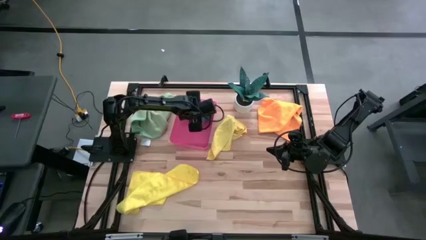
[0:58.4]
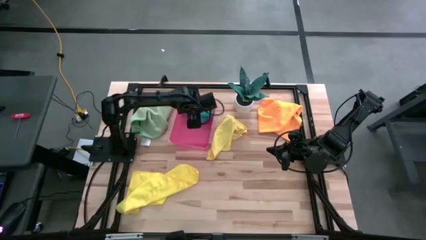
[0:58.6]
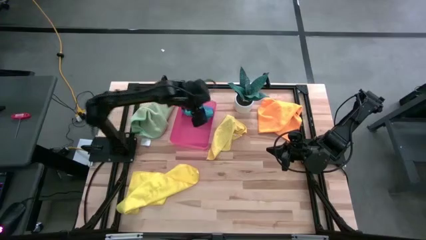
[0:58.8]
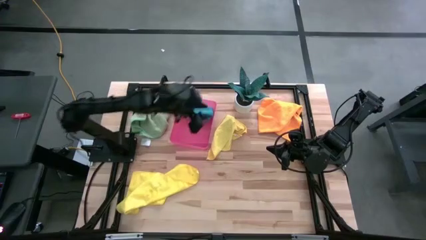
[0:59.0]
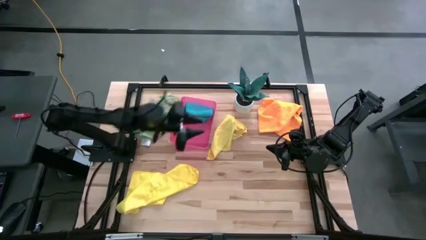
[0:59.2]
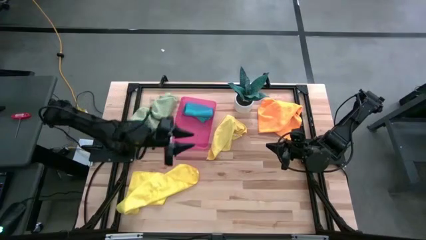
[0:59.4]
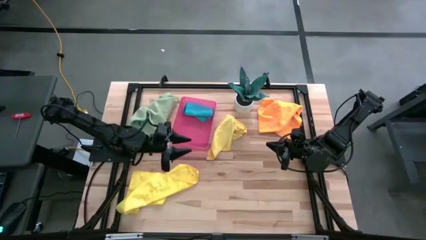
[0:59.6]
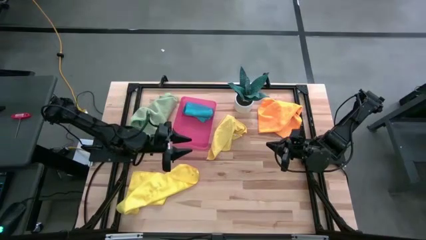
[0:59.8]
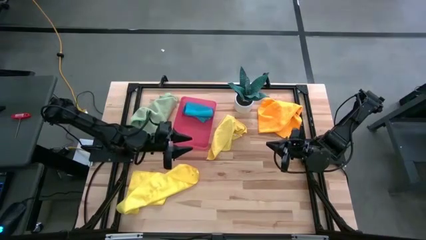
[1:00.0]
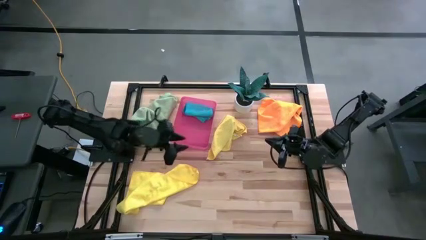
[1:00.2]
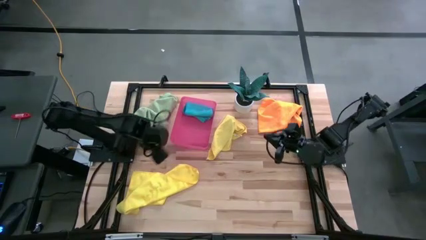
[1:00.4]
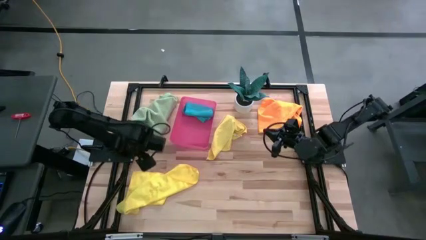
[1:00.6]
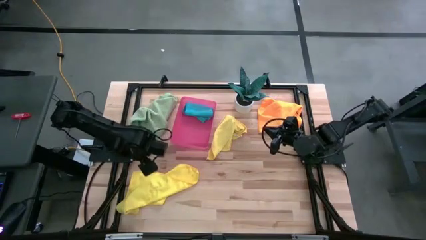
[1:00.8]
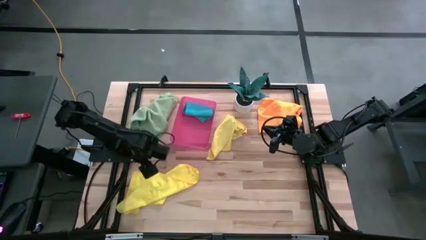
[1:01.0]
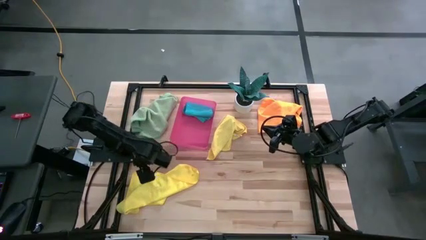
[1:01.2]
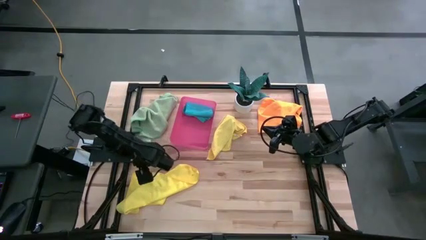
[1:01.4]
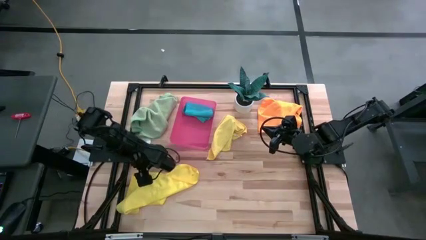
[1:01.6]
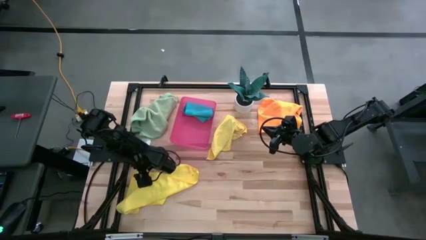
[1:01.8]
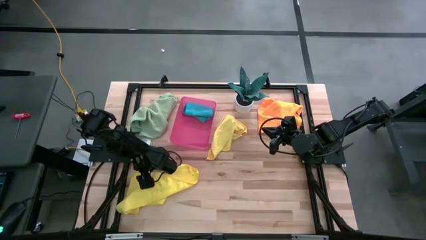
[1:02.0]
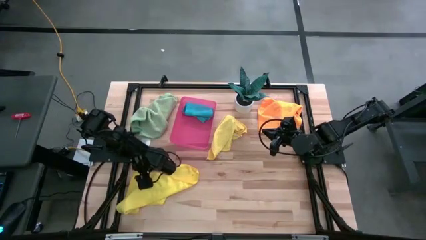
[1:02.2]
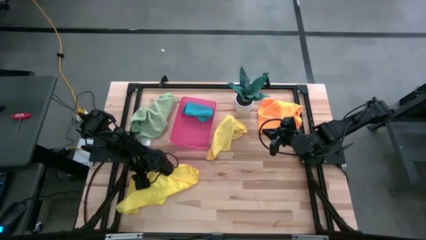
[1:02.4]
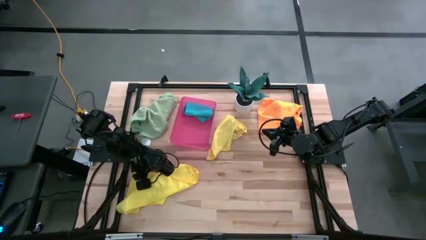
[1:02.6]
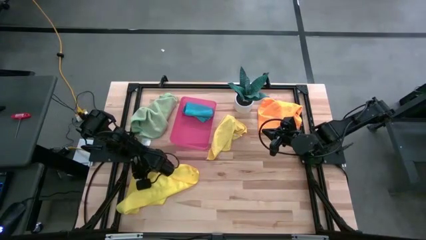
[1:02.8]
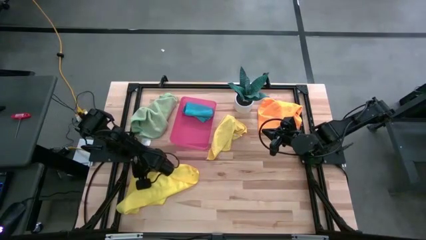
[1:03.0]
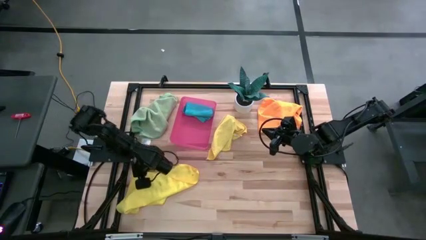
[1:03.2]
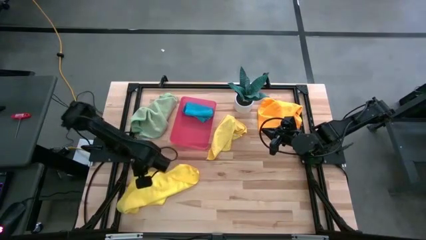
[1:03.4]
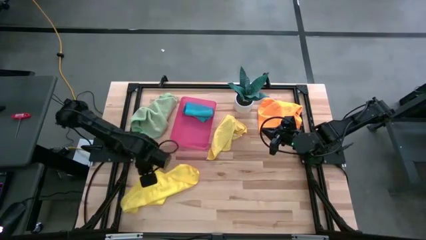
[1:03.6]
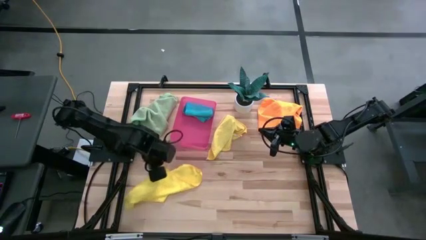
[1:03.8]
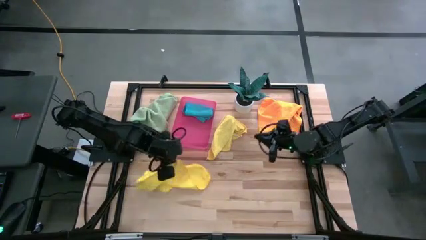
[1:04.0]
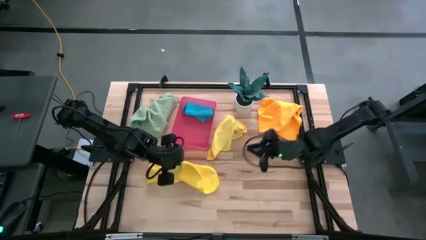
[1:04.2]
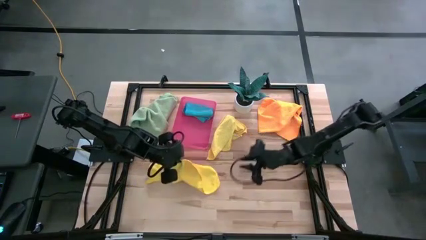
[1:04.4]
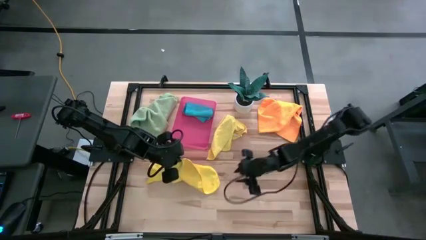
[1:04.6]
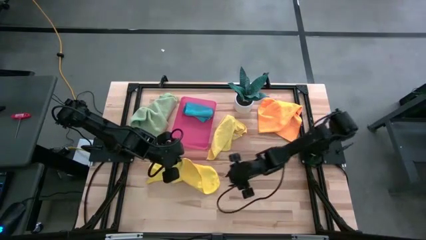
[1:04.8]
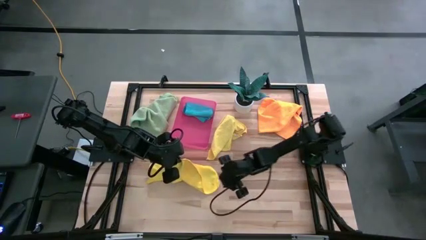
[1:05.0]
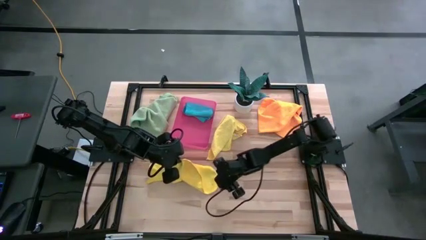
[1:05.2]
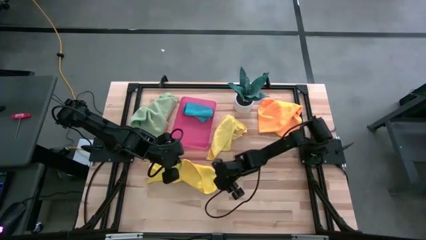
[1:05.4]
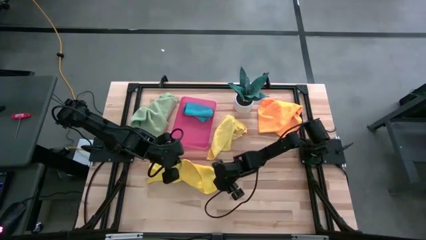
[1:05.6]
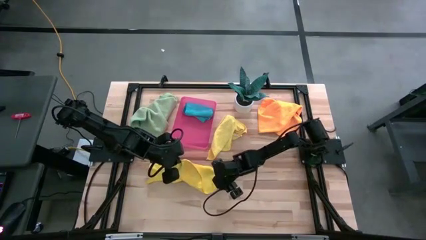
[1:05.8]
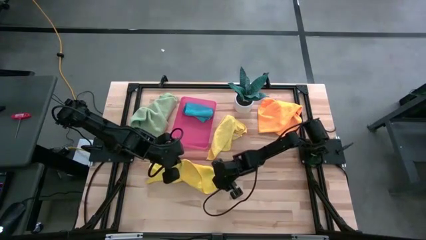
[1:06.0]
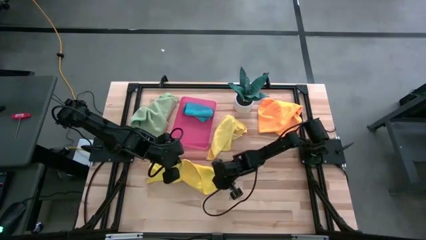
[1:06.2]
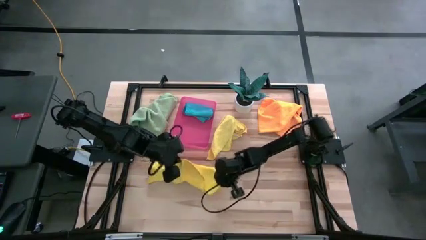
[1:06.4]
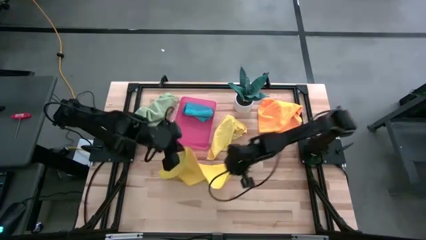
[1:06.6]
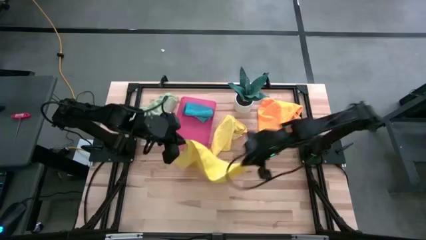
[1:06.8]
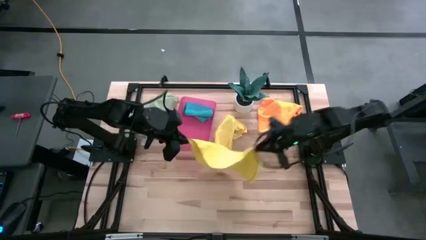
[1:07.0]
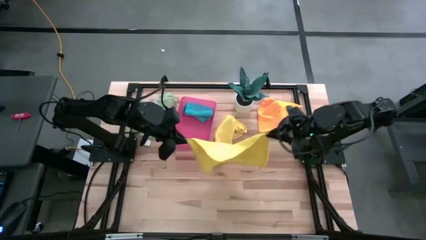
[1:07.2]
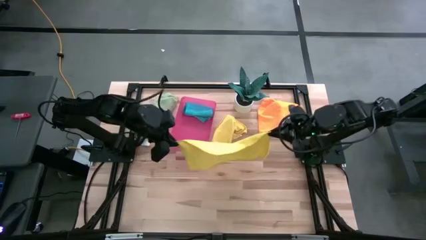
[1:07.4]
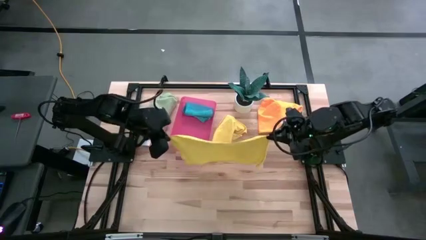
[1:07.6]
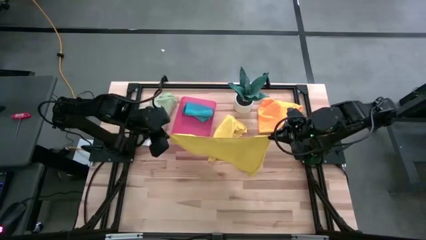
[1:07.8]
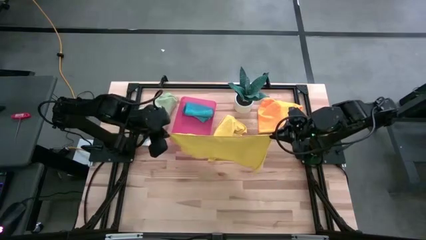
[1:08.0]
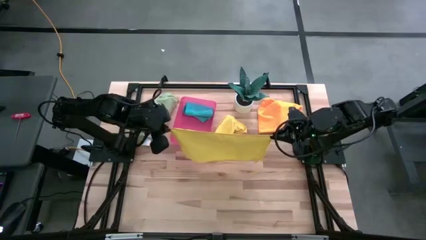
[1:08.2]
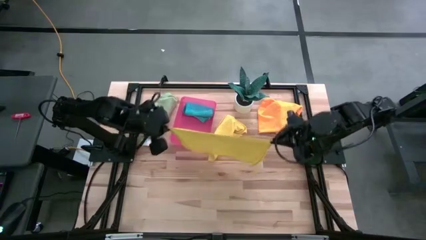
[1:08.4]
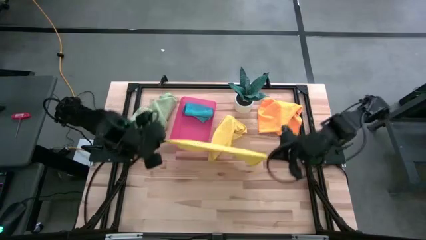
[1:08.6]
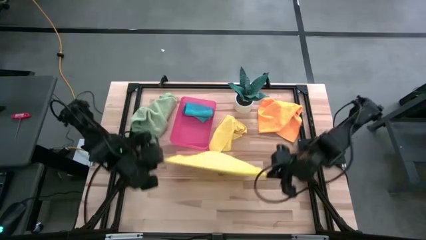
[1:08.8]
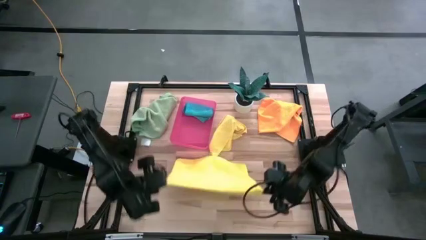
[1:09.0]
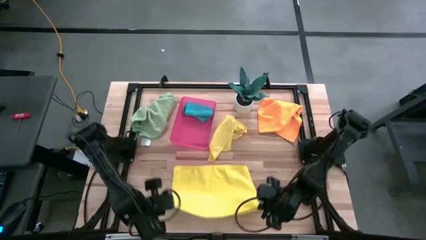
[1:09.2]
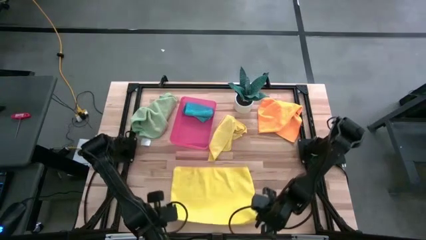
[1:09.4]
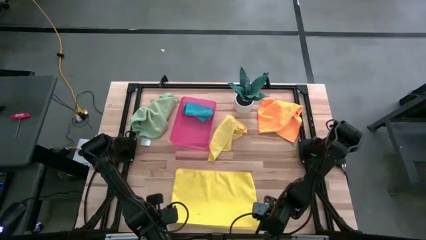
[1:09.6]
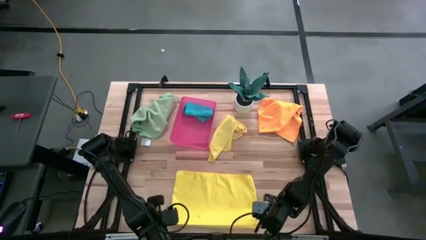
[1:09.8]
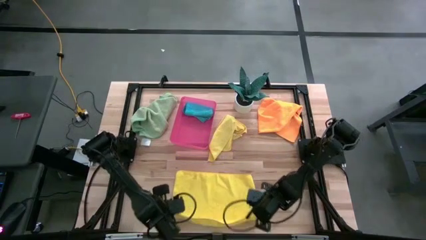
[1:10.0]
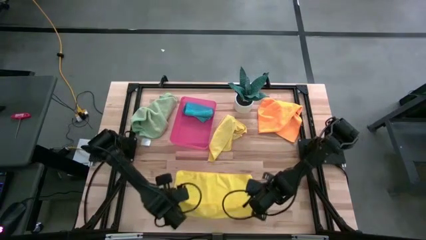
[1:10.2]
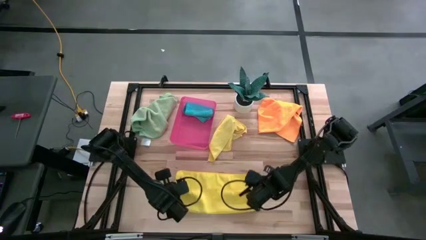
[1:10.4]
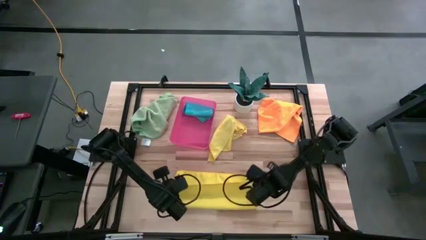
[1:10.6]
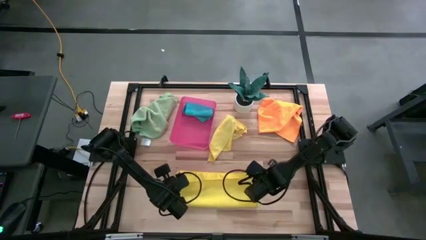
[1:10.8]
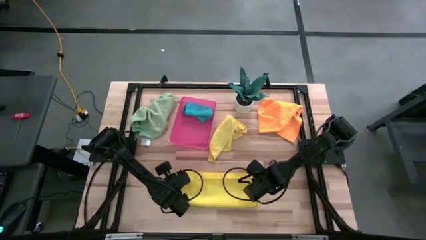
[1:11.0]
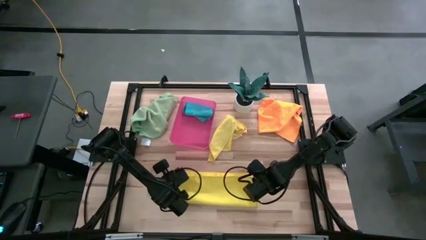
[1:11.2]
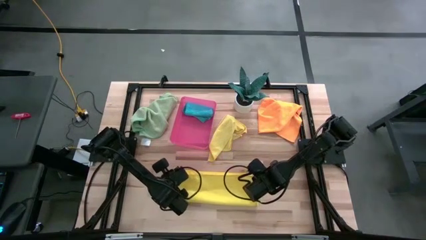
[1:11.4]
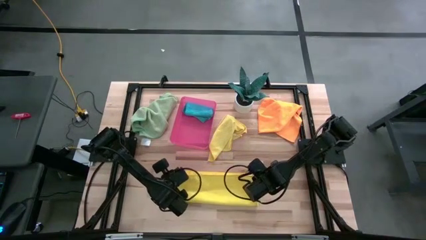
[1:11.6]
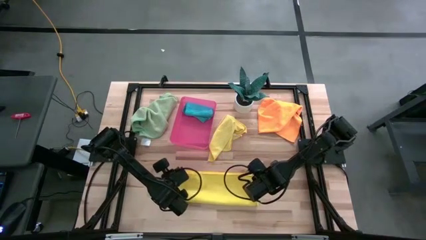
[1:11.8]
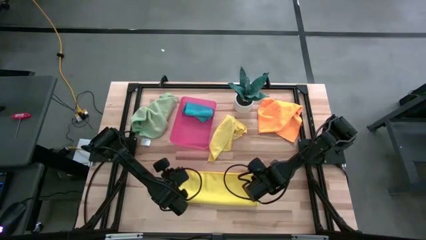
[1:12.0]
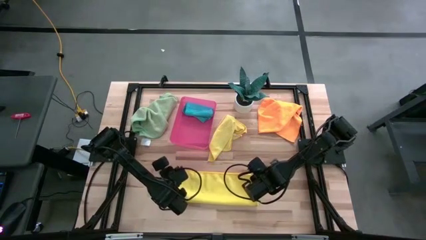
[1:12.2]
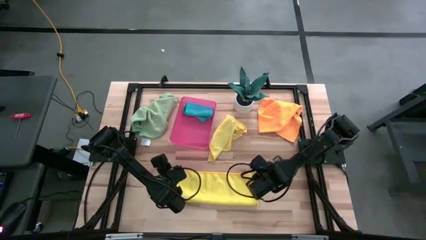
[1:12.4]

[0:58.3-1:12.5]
Task: Fold microfiber towels
Fold the bottom yellow microfiber cloth

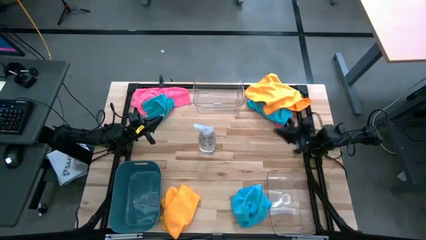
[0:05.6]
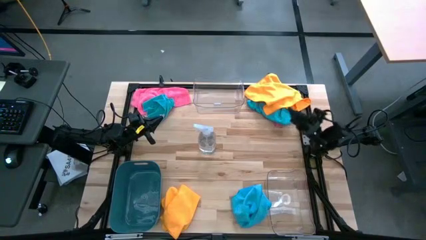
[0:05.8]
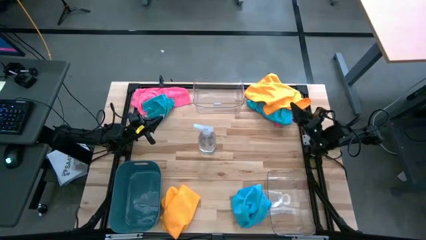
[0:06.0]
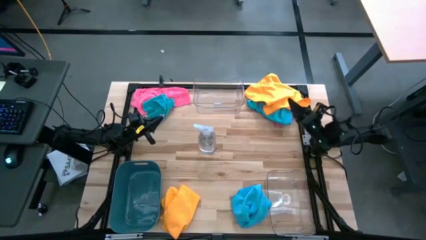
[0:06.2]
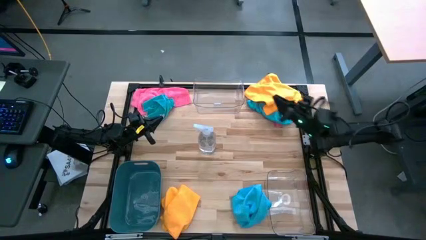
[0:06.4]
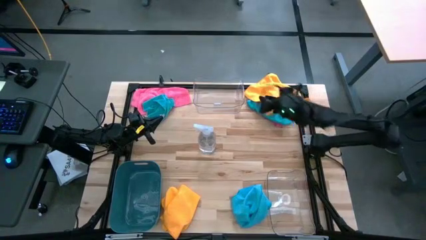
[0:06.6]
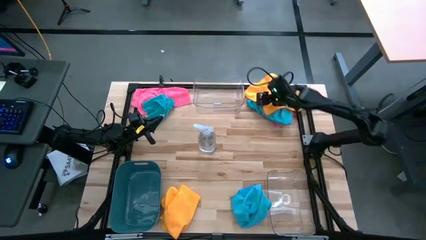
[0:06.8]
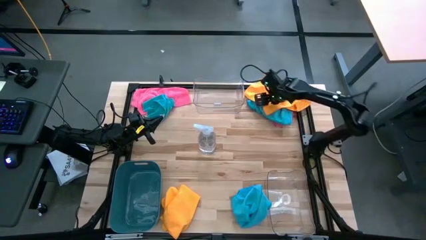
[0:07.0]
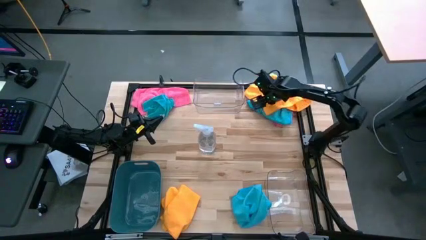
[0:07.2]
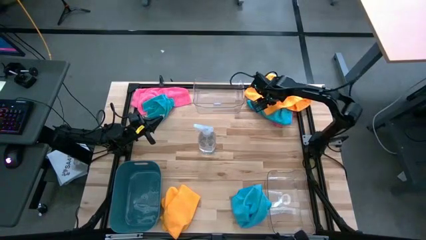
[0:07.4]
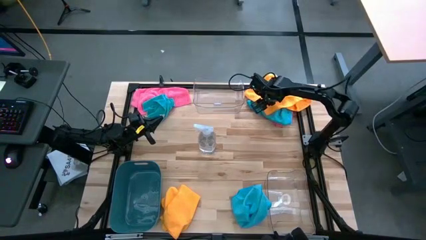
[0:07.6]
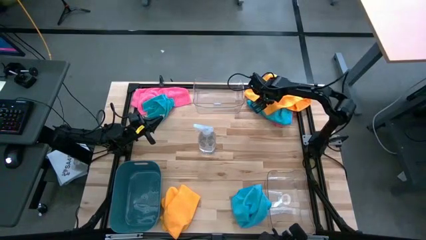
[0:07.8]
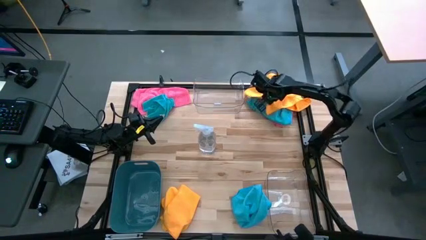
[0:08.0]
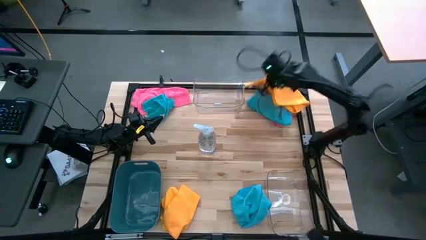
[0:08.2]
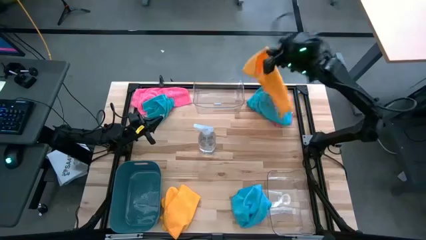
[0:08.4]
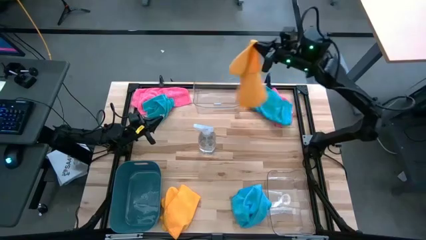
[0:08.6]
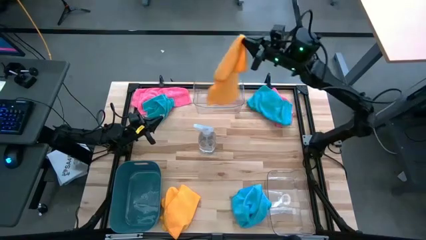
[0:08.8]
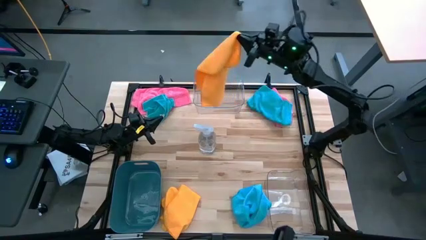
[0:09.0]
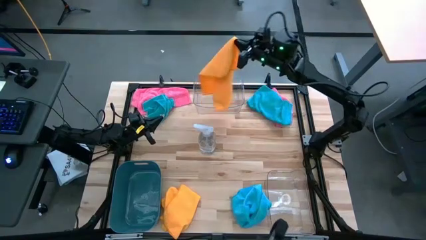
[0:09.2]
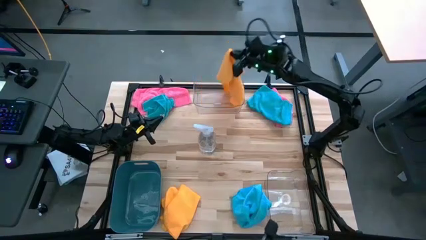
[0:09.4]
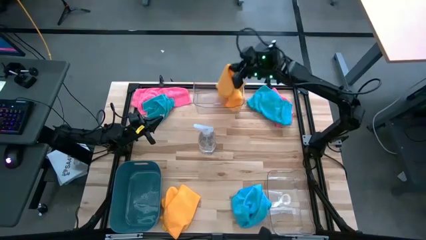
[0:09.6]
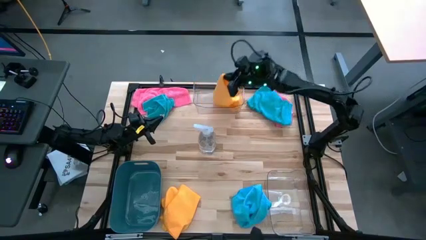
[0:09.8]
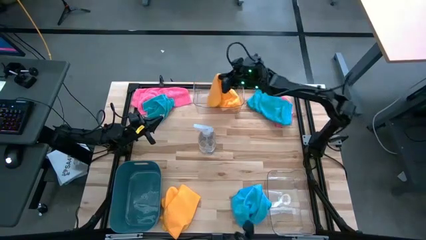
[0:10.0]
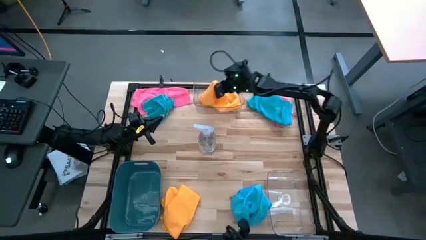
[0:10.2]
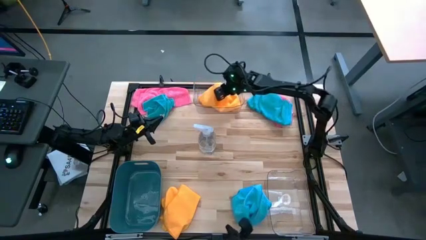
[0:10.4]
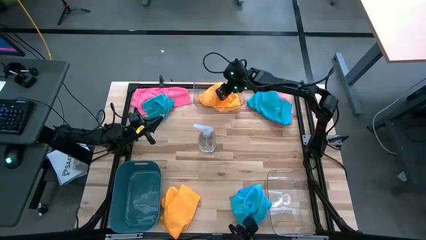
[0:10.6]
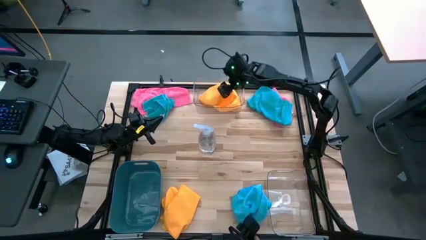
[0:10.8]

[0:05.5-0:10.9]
Task: Sort microfiber towel by color & place in baskets
Put the top yellow microfiber cloth into the top transparent bin
